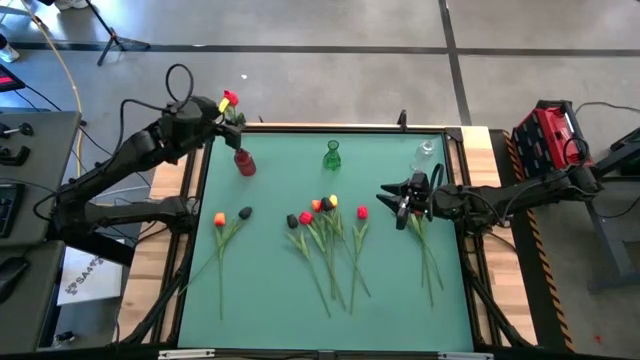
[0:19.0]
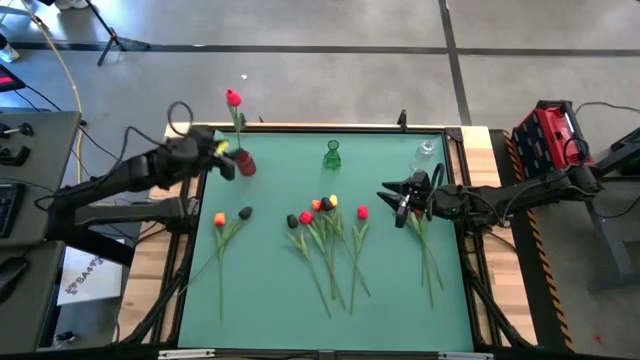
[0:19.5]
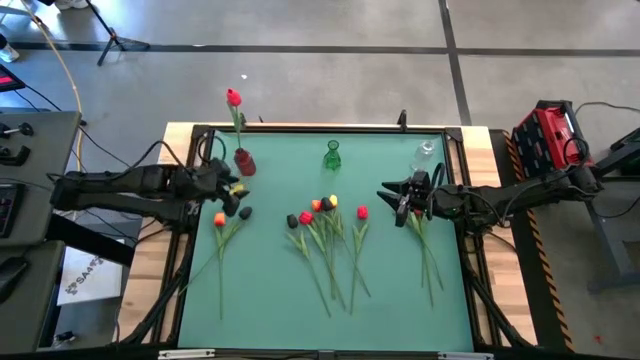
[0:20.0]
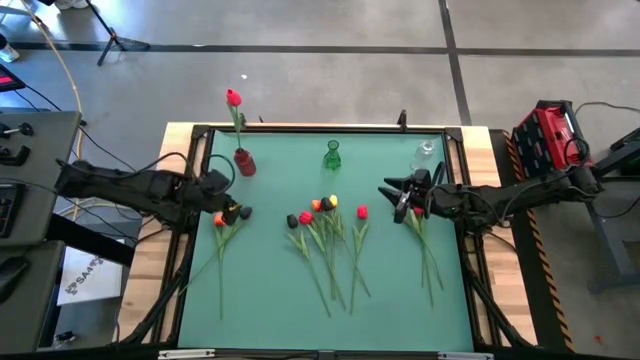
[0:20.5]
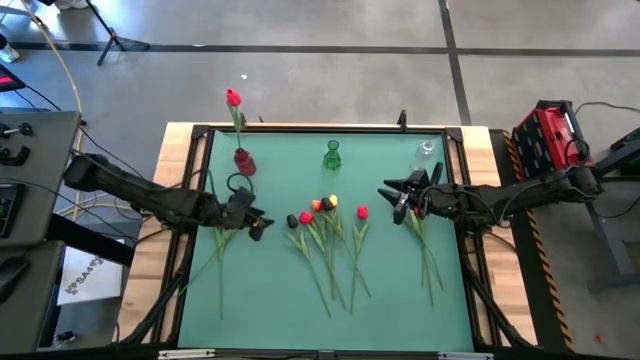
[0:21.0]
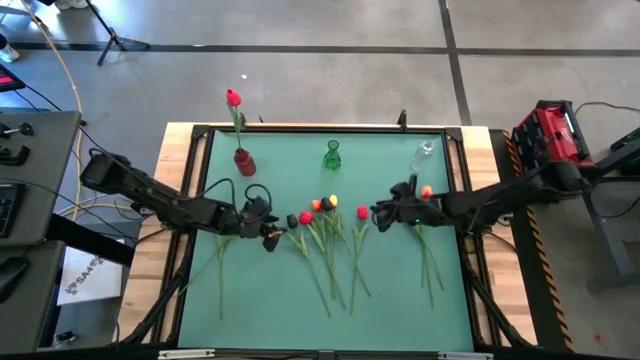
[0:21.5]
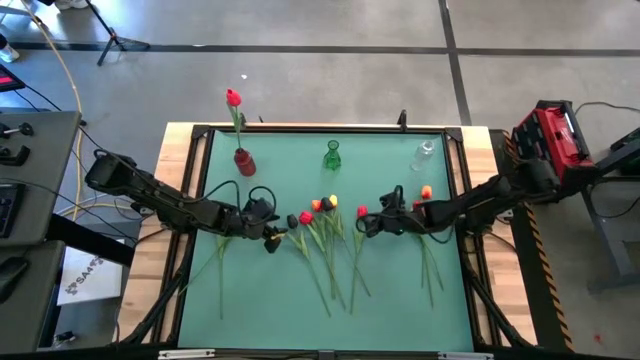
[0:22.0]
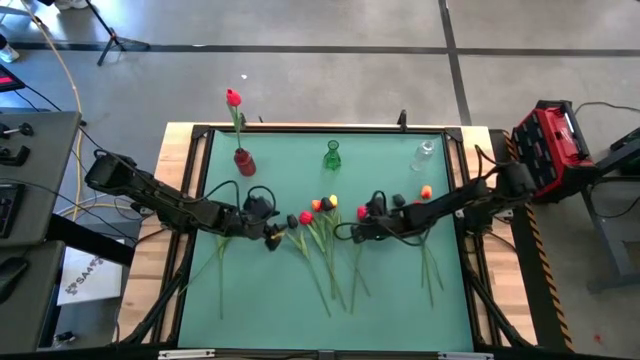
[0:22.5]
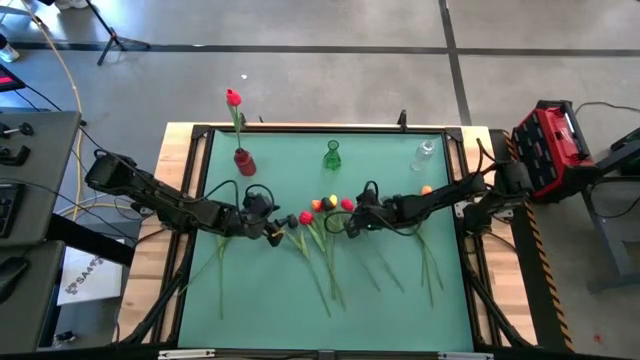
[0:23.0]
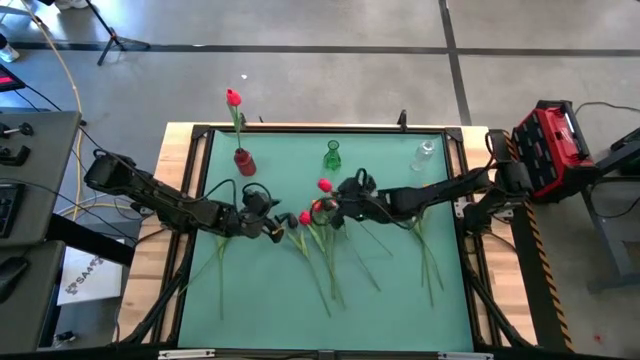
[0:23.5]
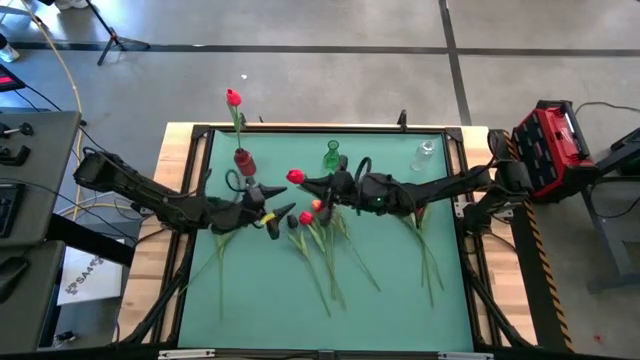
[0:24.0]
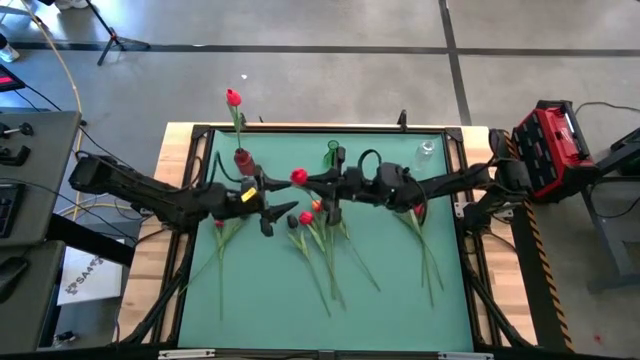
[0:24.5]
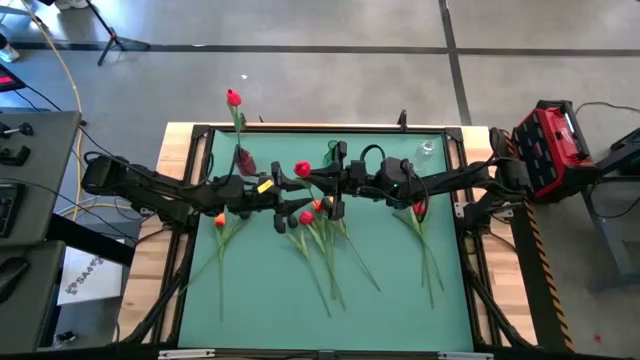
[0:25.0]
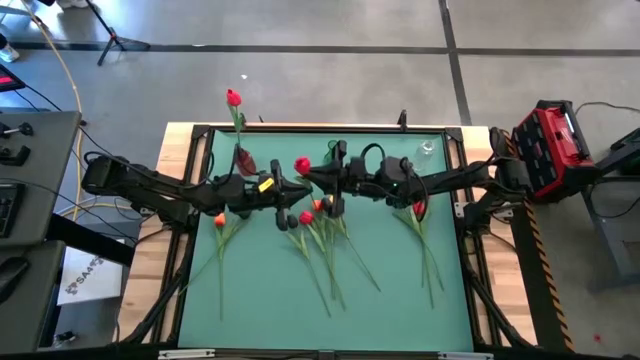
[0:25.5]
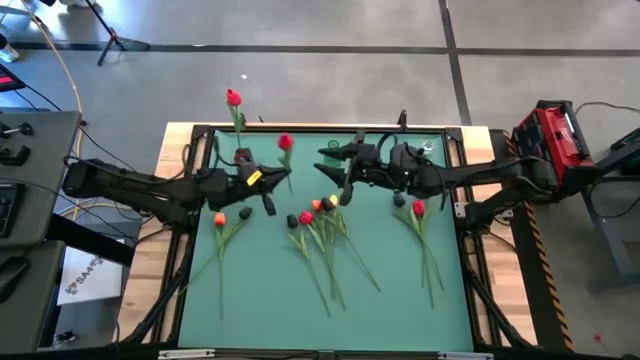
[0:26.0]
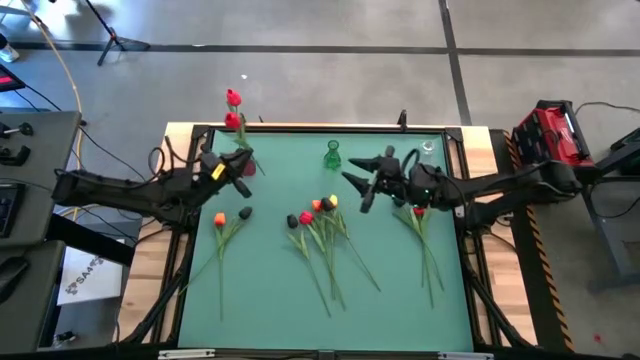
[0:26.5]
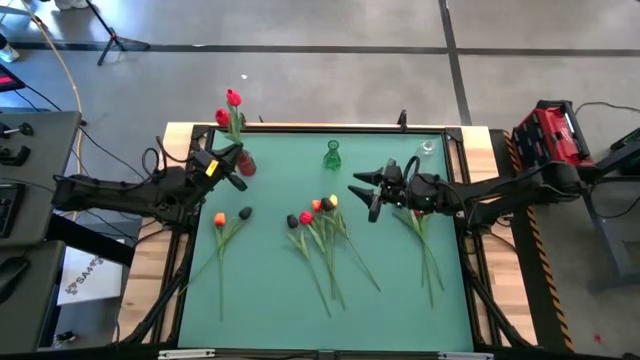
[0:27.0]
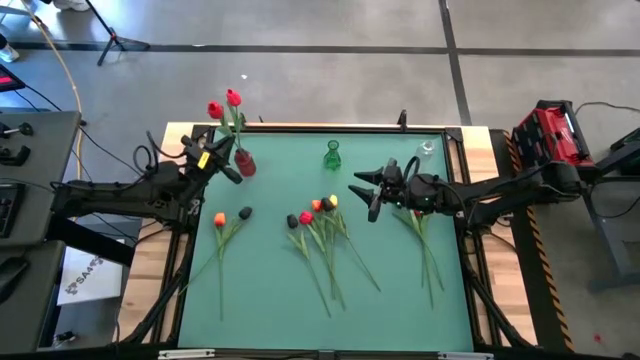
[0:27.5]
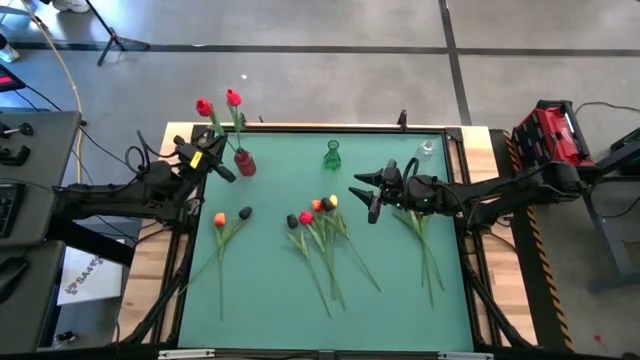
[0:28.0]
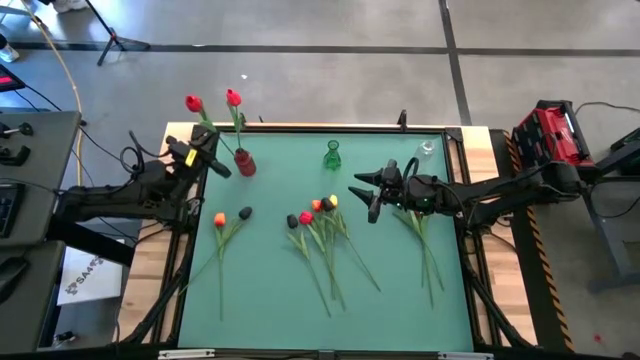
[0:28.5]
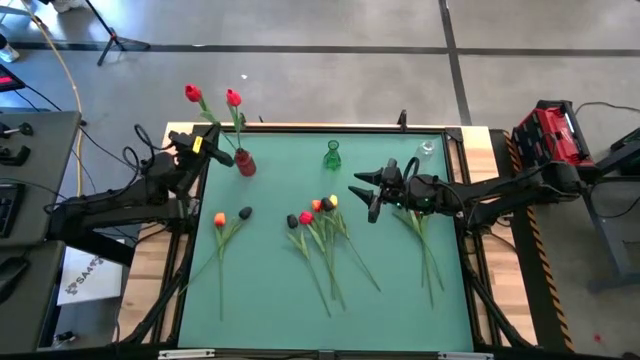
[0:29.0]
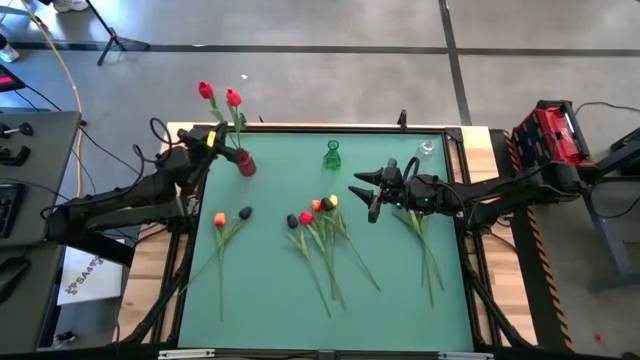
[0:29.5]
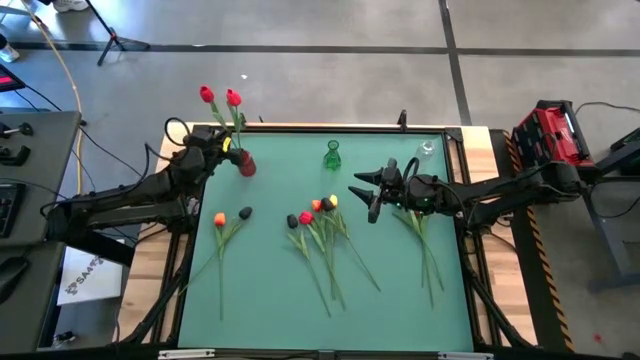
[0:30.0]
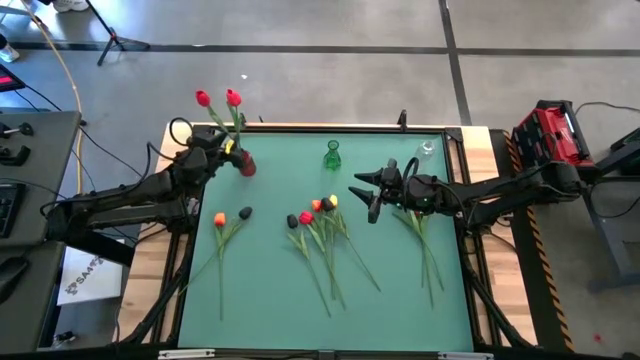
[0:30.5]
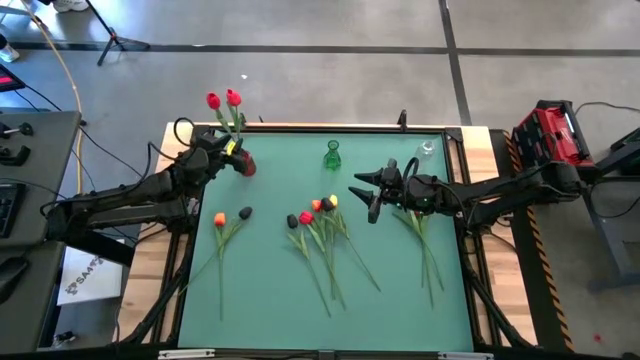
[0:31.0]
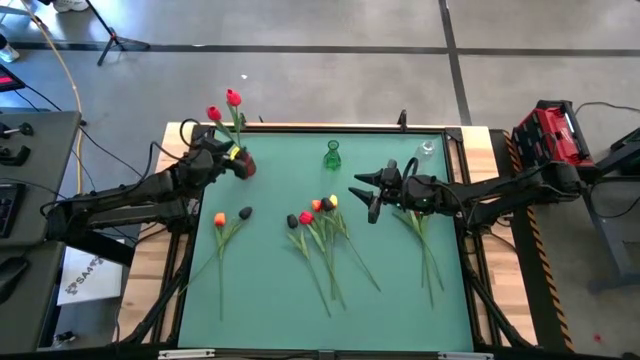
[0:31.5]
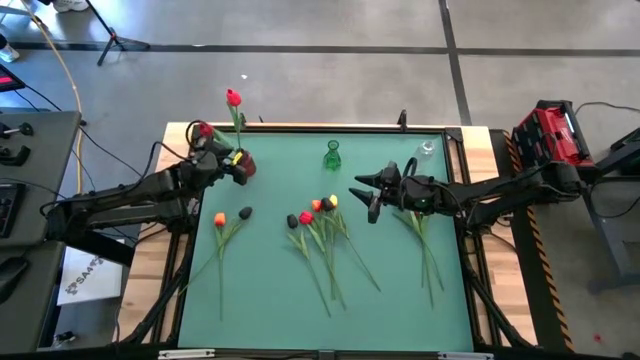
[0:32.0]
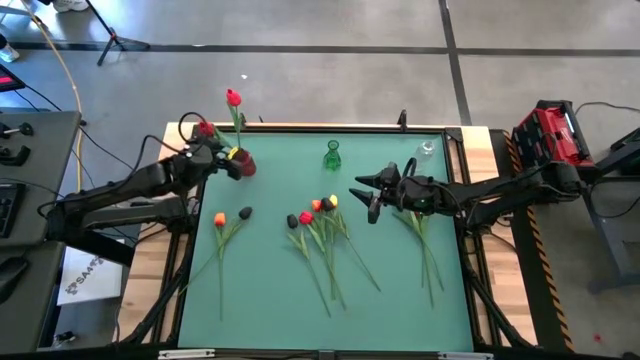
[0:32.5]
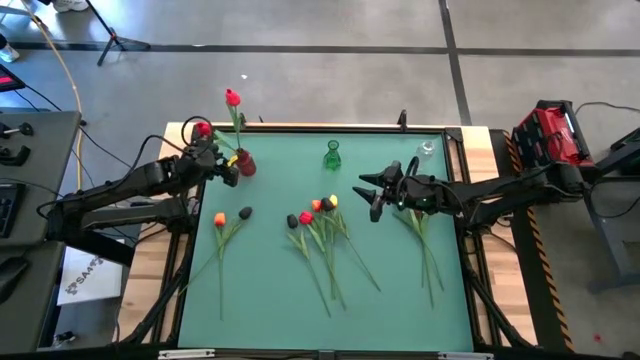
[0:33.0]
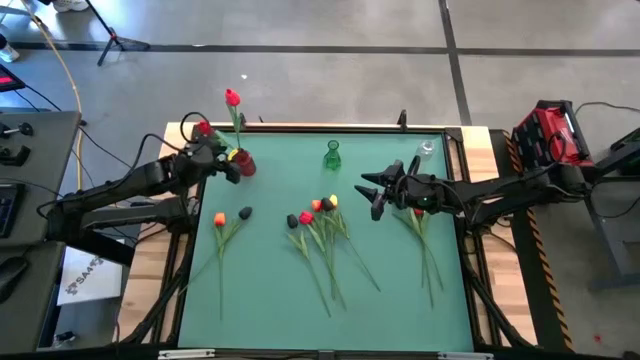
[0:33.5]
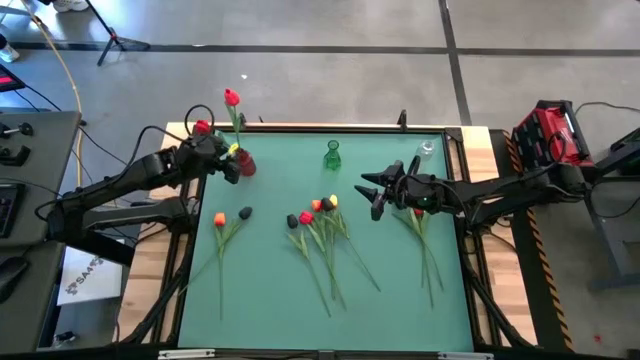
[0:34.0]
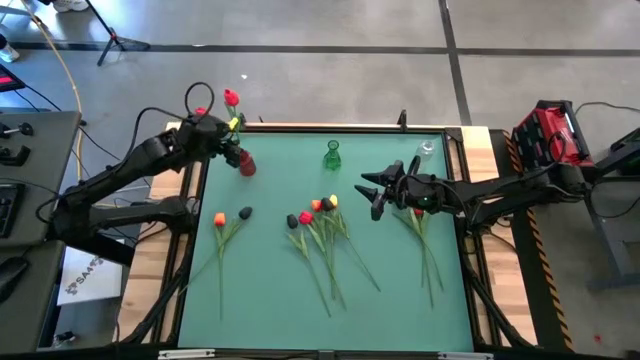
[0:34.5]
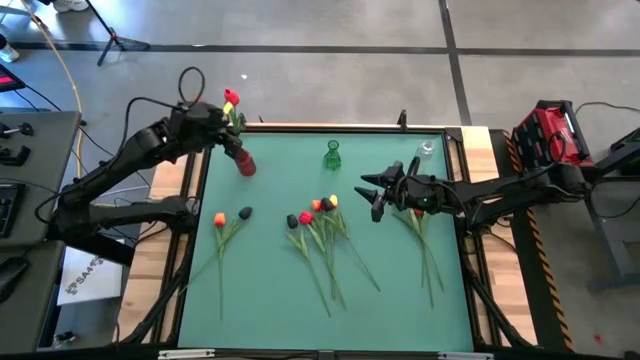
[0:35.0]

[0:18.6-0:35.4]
Task: Sort flowers into vase by color
Put the red tulip into the red vase

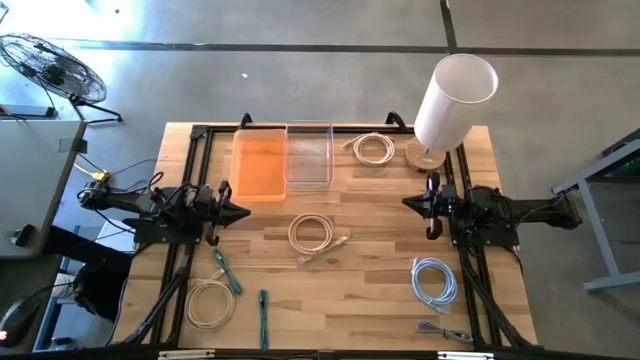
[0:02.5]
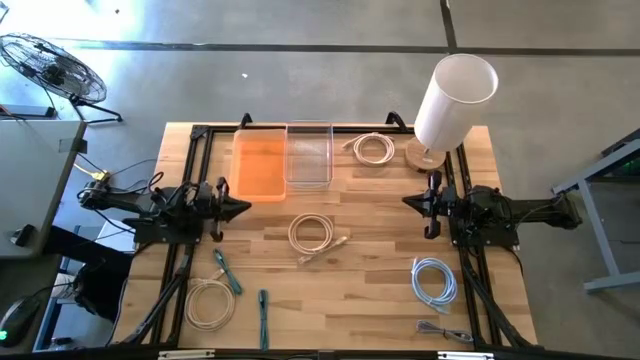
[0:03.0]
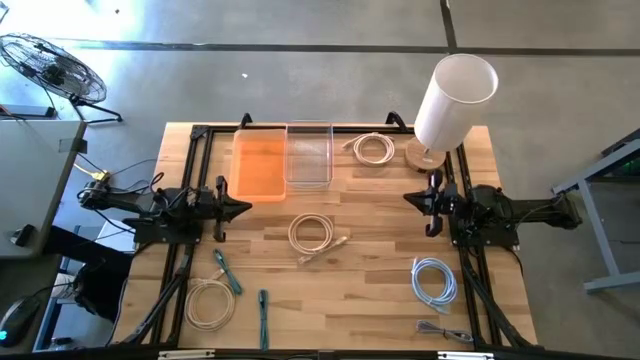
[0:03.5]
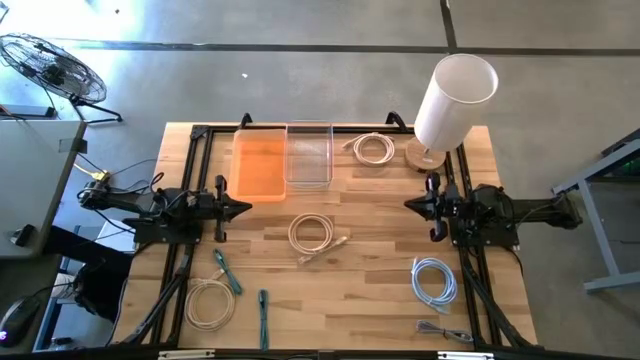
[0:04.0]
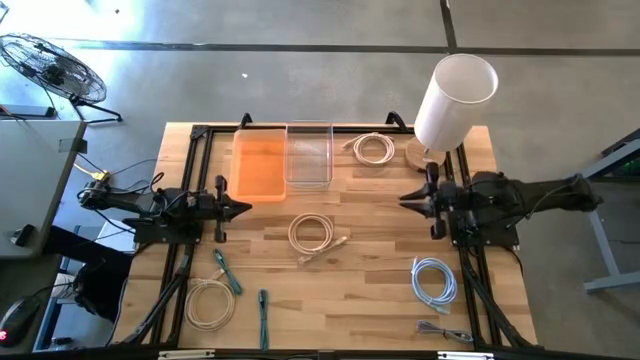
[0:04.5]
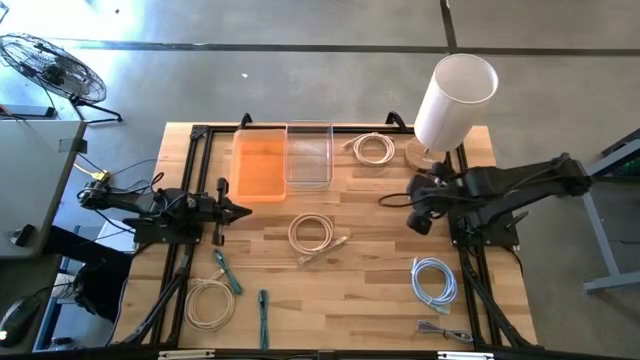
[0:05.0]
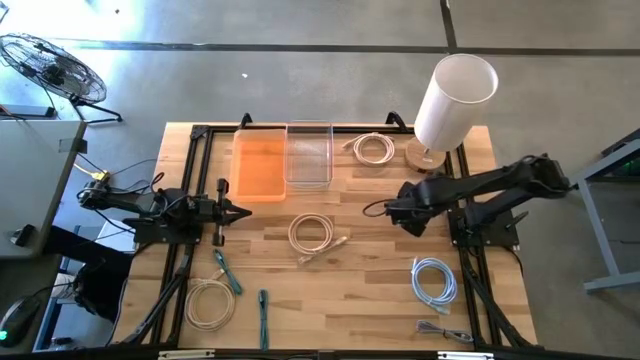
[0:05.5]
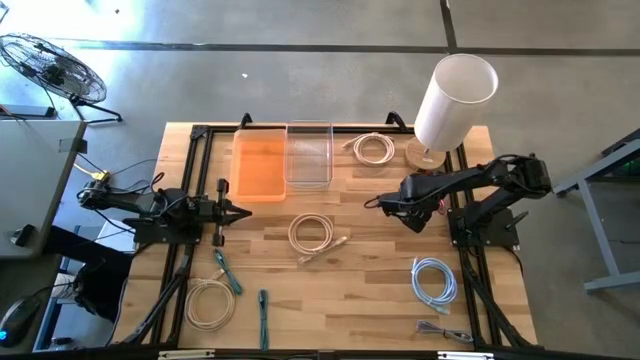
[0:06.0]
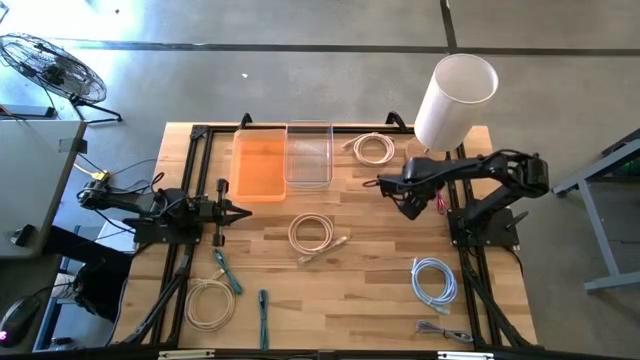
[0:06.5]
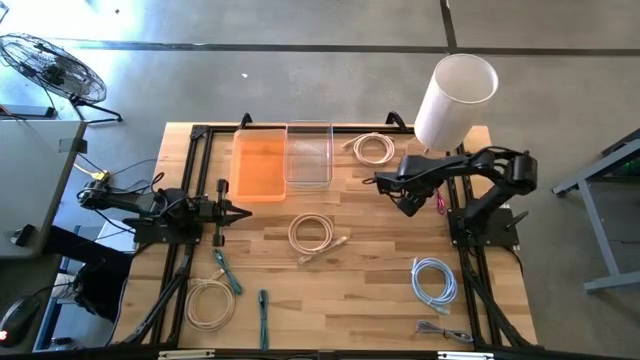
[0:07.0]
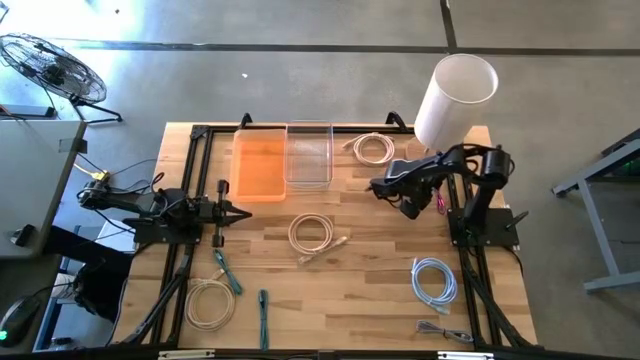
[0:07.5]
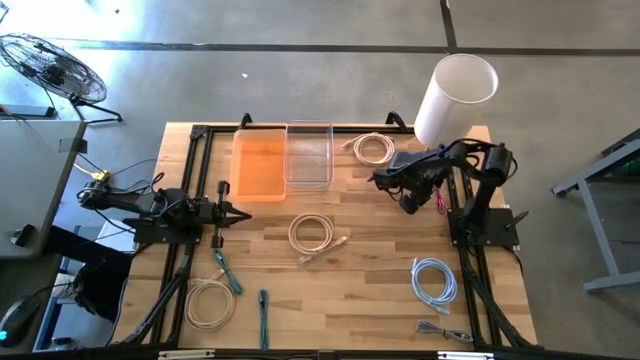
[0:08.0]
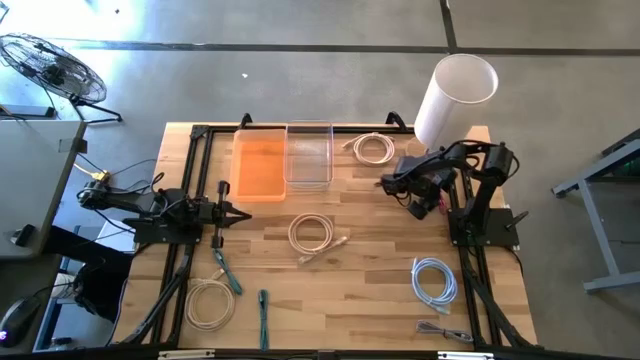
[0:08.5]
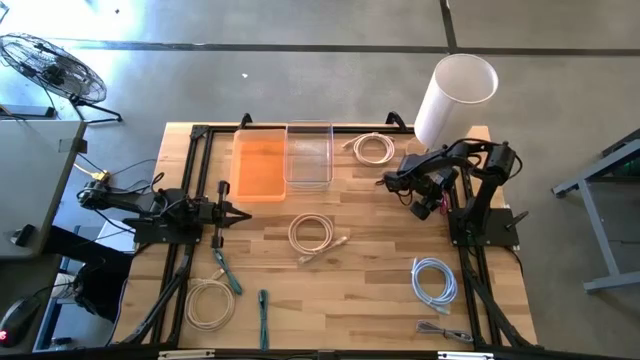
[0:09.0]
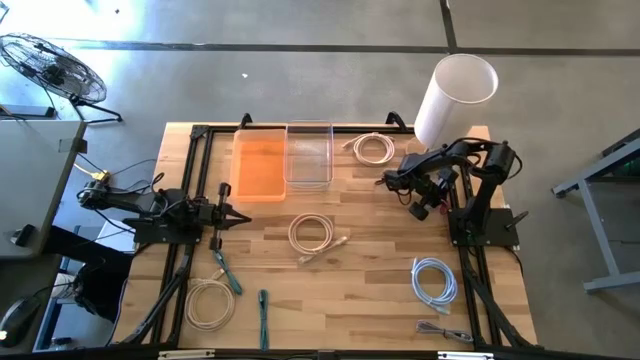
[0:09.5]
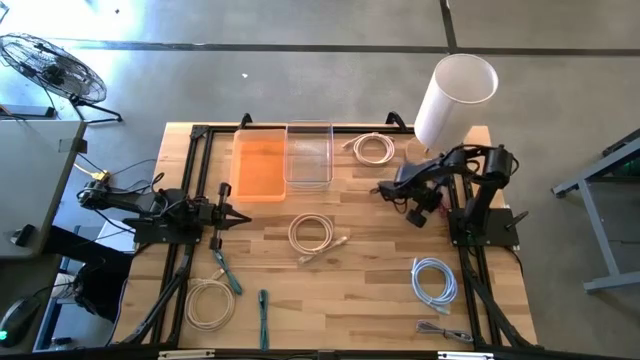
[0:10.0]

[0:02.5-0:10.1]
Task: Pick & Place USB Port
Put the pink and black charger cable into the orange bin
